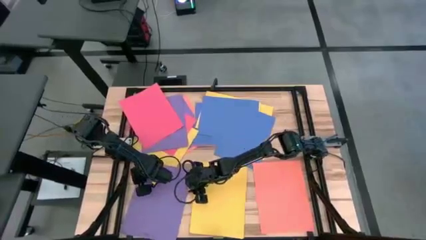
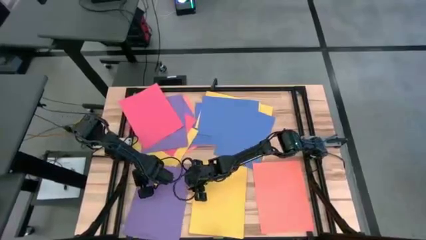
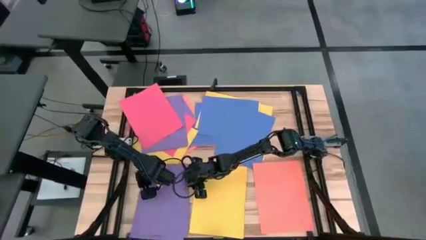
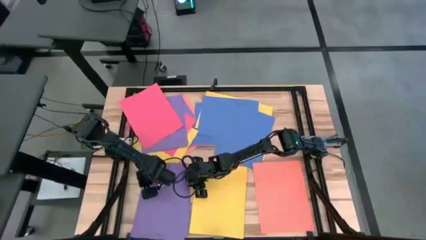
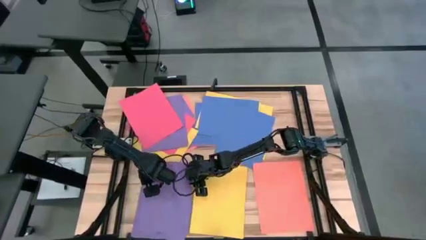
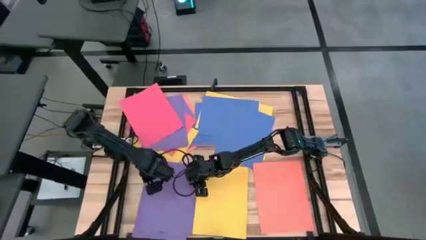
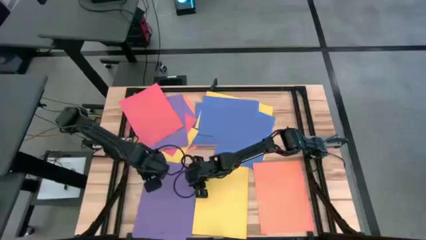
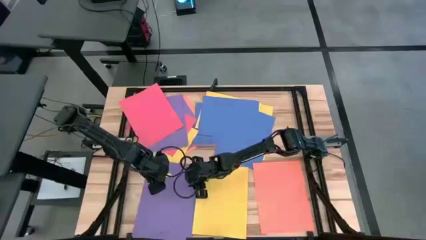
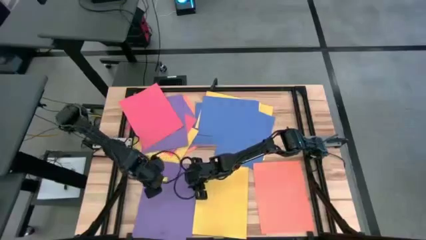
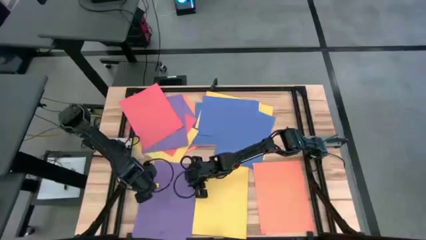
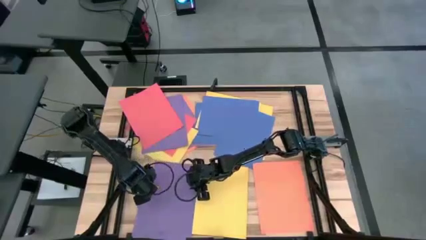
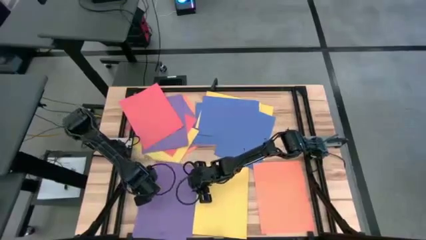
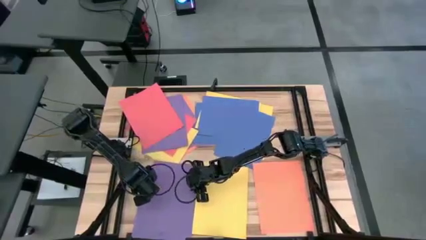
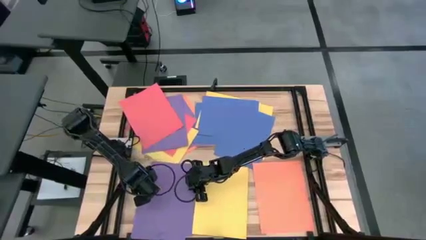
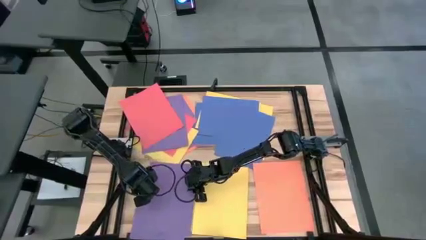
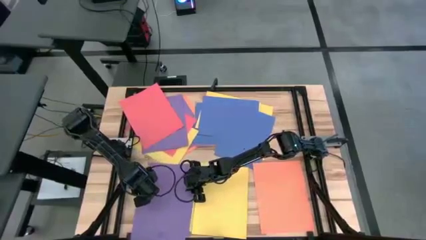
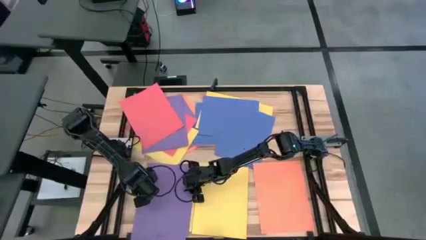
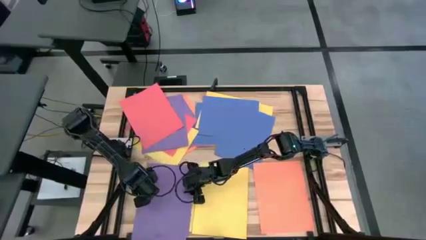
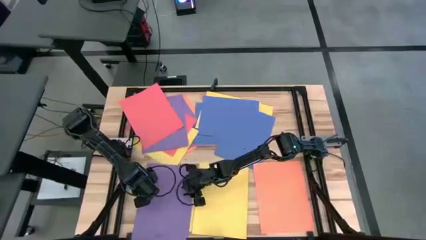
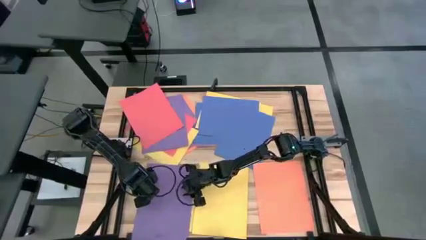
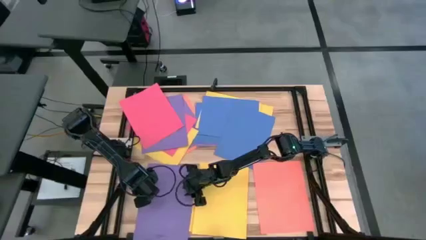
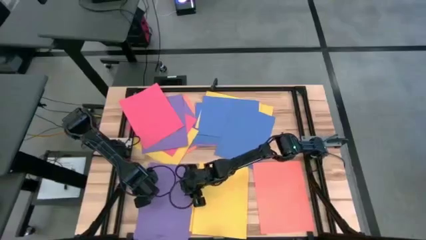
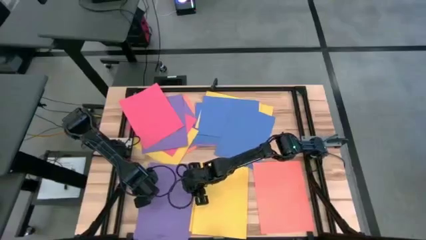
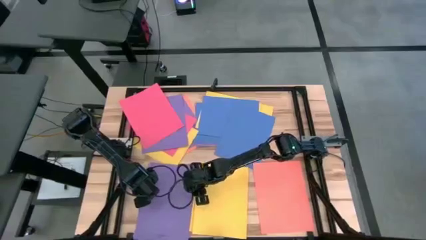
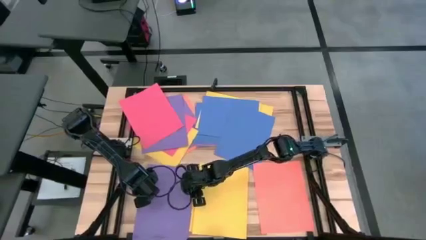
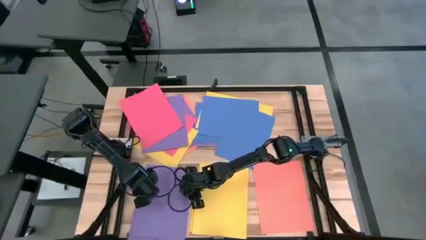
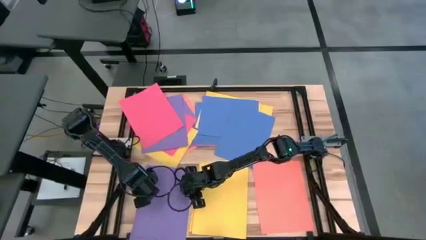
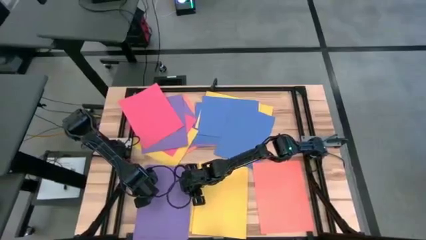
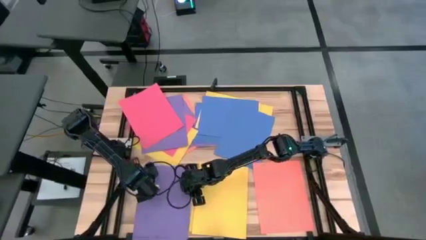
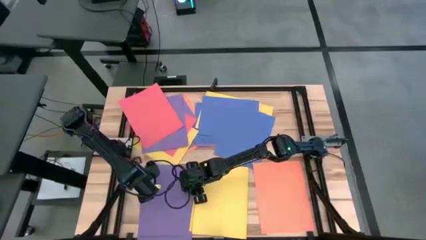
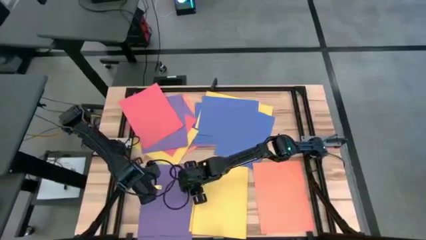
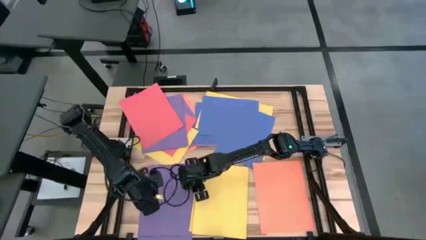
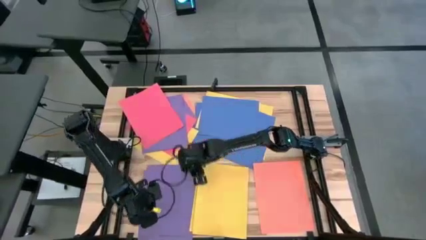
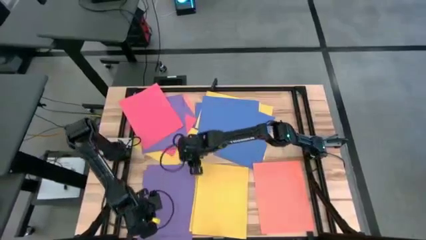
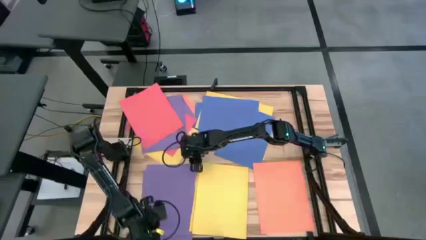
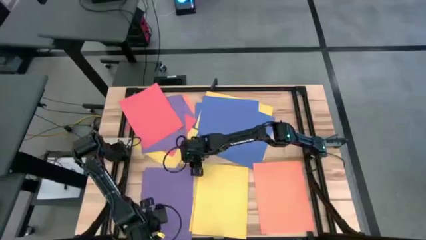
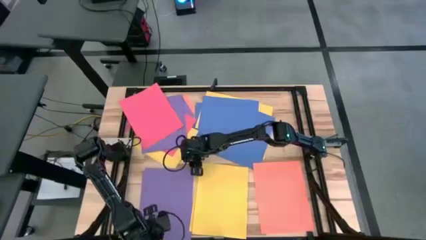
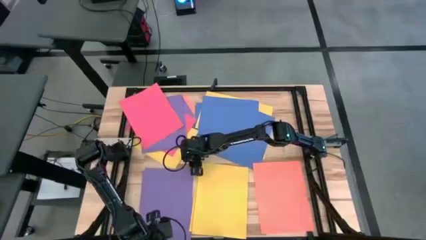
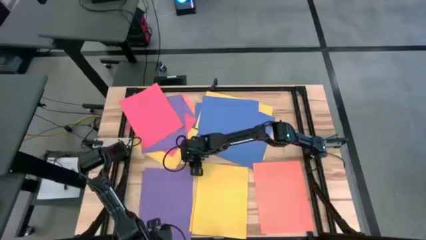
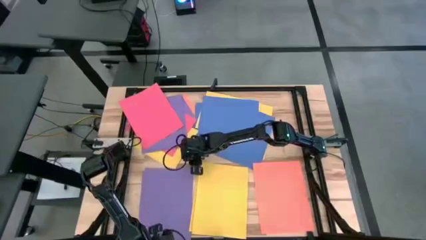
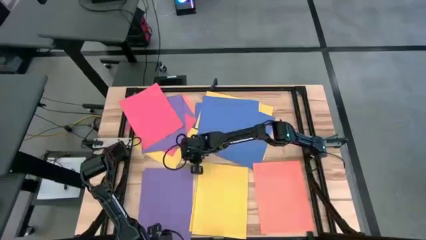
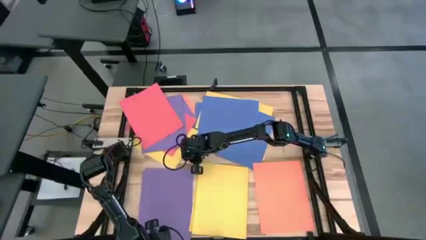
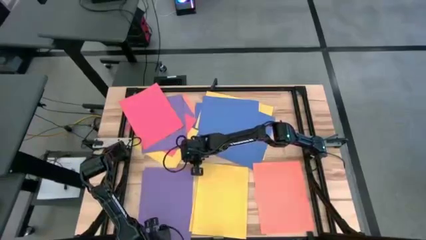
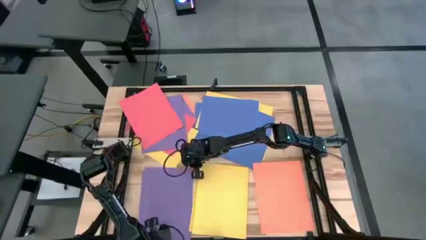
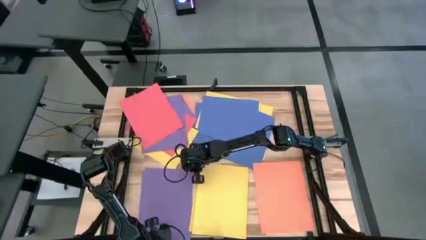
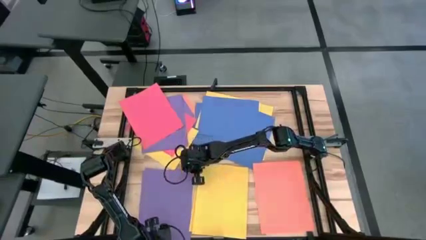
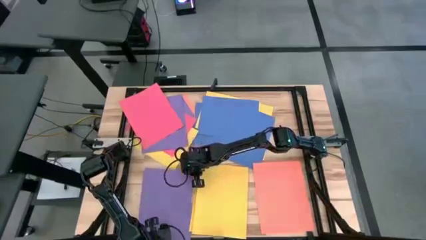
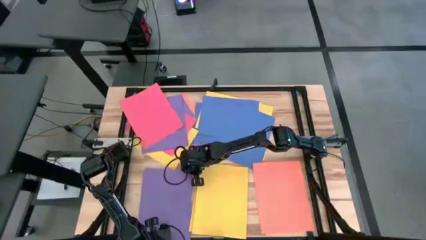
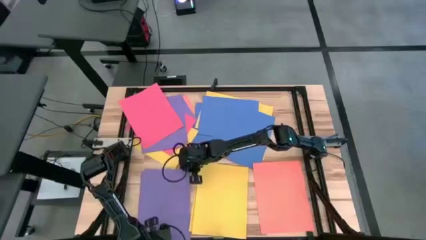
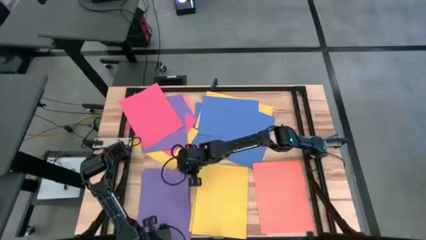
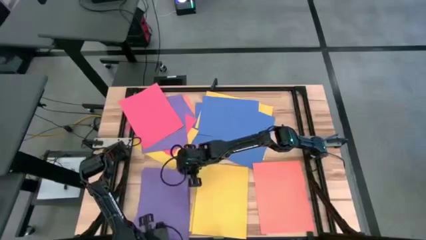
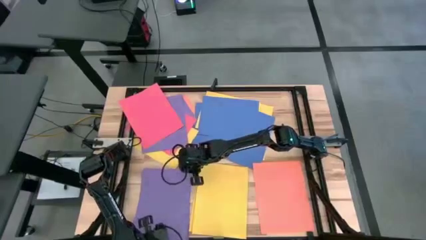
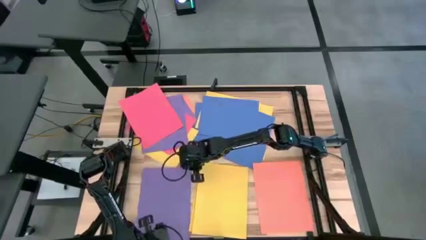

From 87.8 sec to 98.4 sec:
Task: Organize paper
Stack the violet paper on top of the violet paper

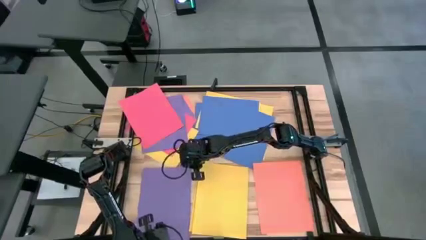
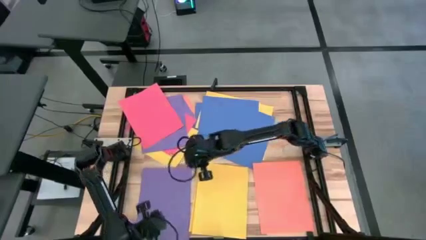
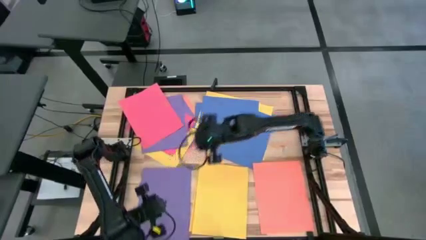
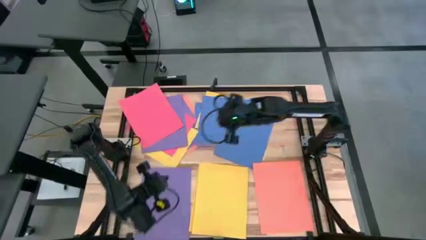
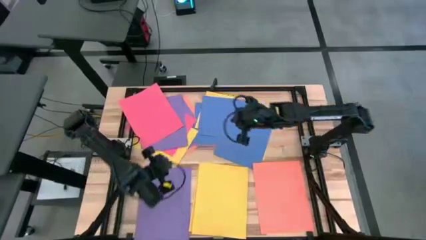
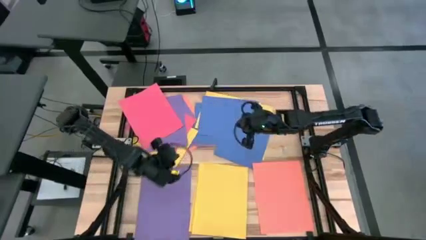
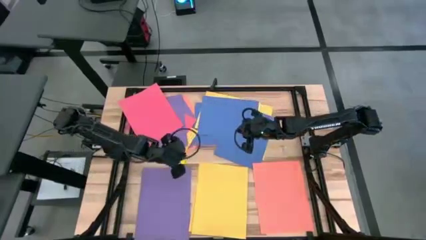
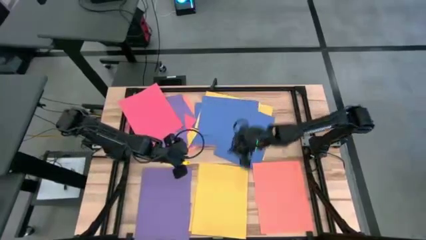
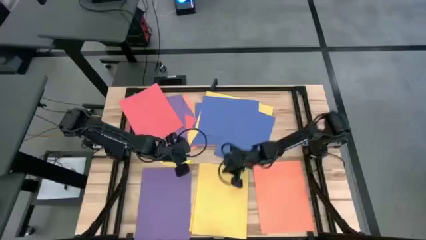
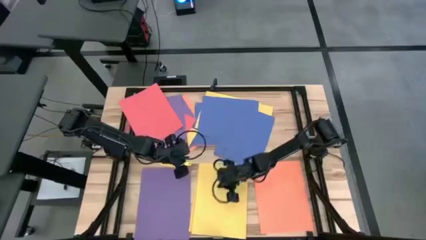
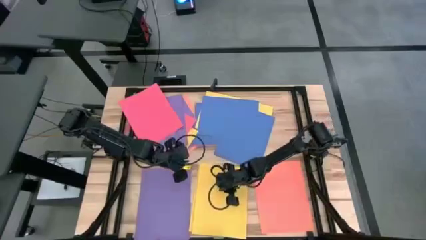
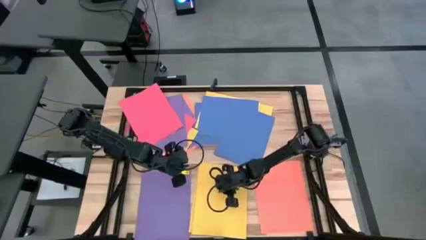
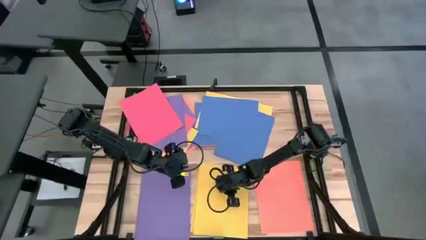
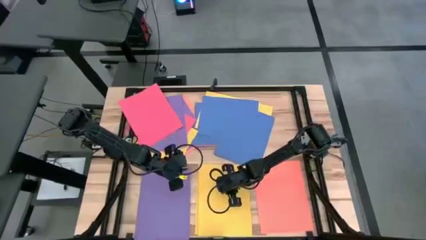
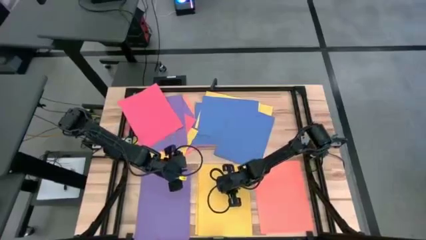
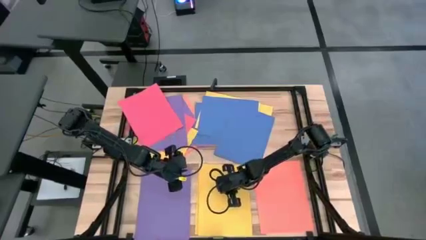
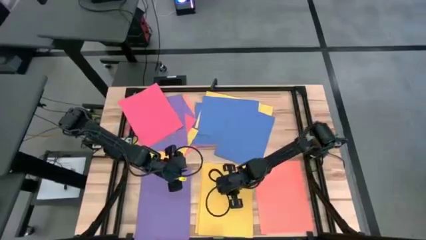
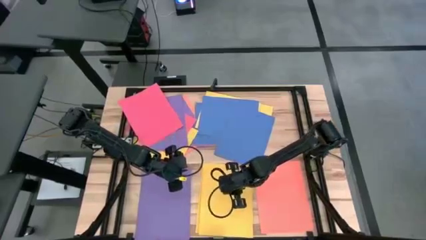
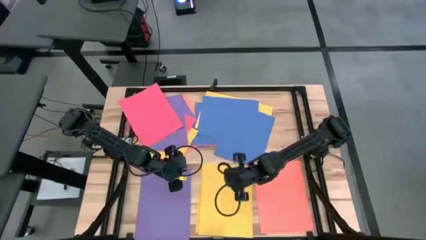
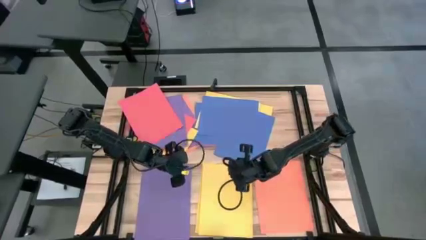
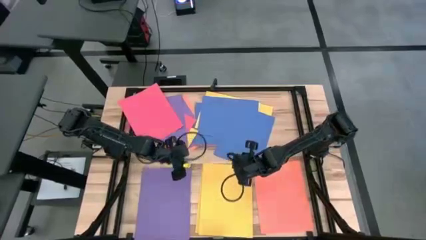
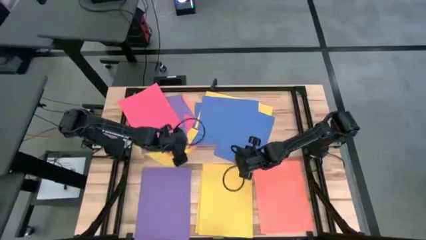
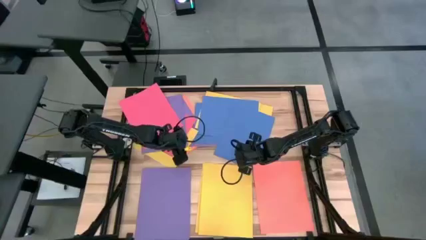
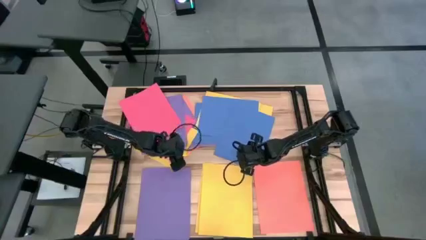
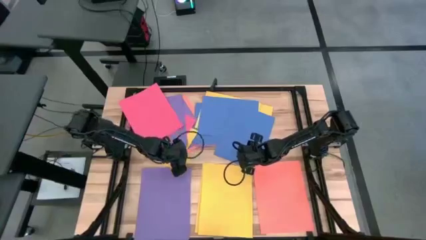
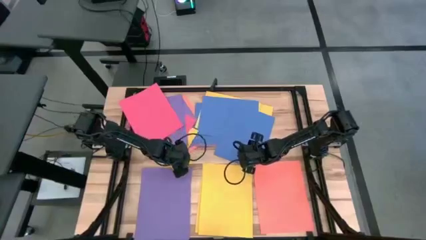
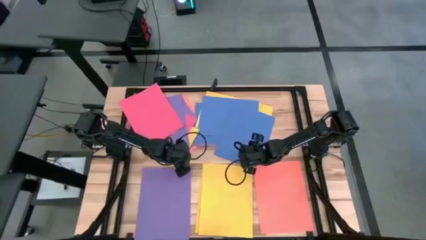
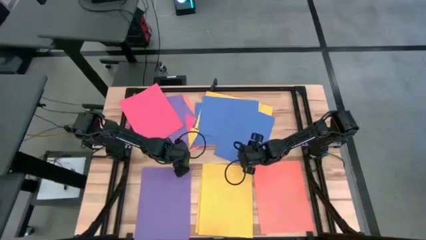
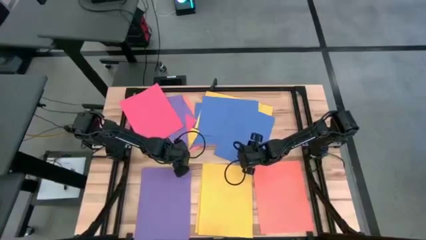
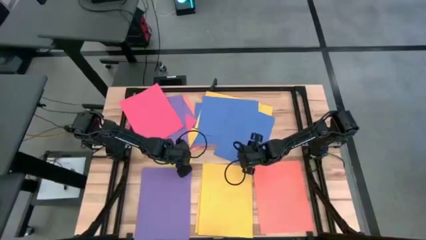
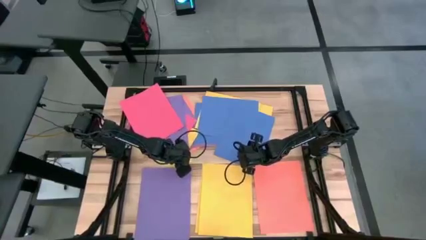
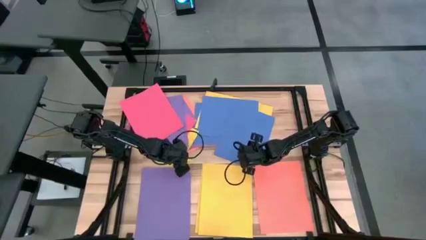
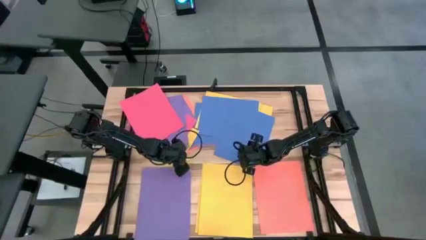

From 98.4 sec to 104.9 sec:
Adjust the stacked yellow papers

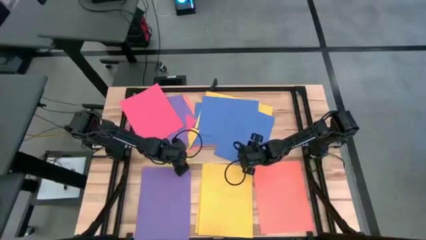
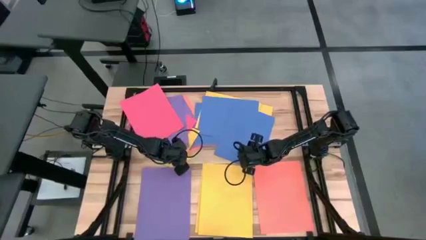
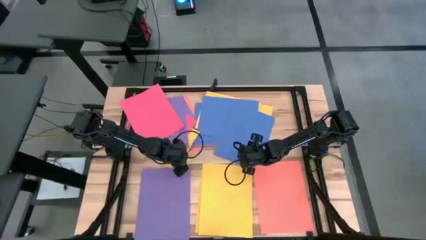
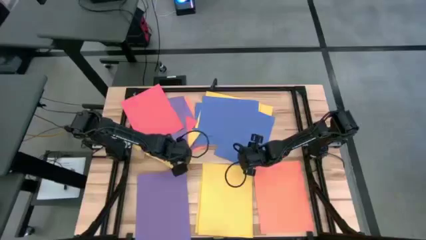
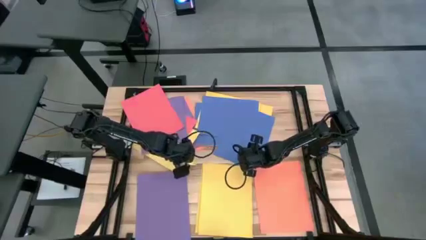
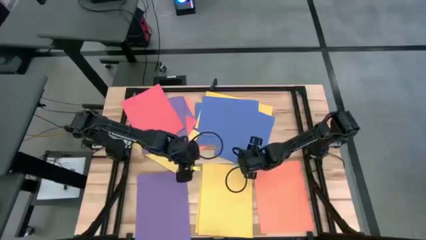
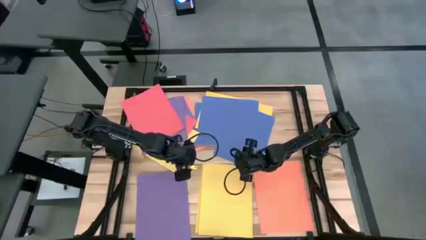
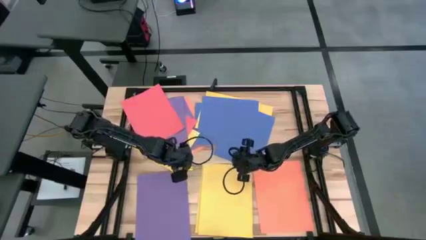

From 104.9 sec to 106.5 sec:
Stack the yellow paper on top of the yellow paper
